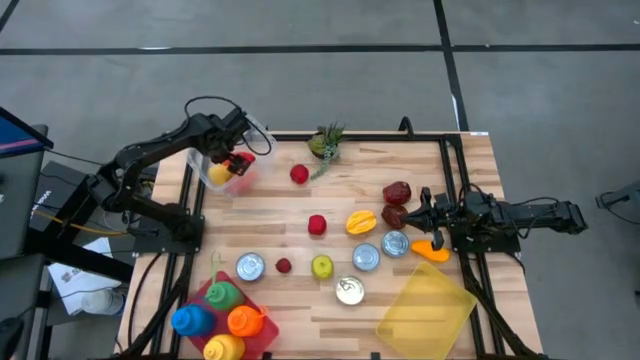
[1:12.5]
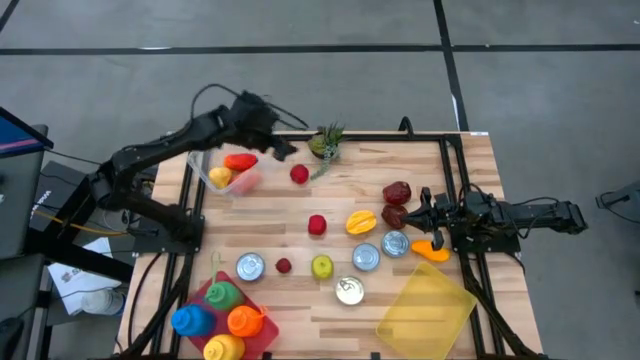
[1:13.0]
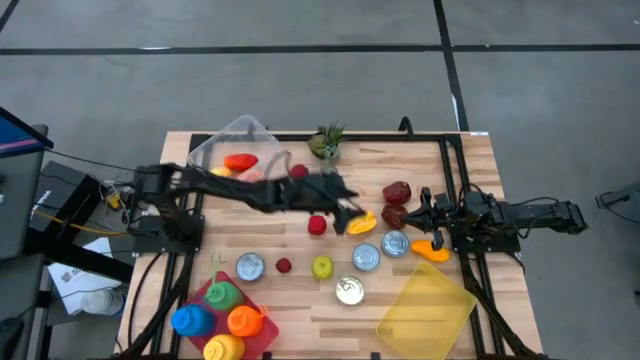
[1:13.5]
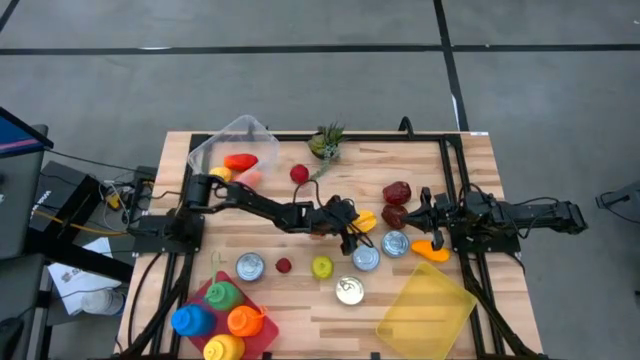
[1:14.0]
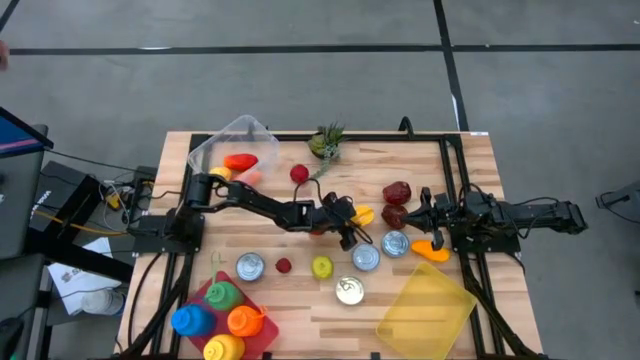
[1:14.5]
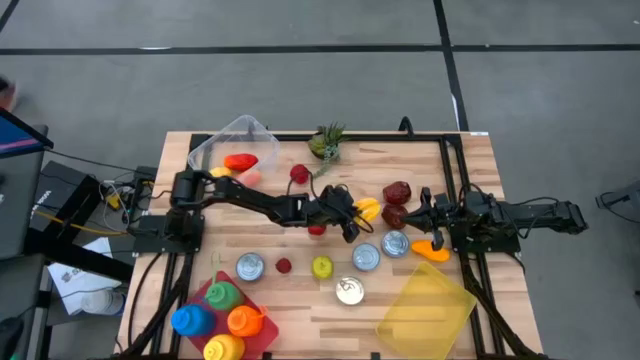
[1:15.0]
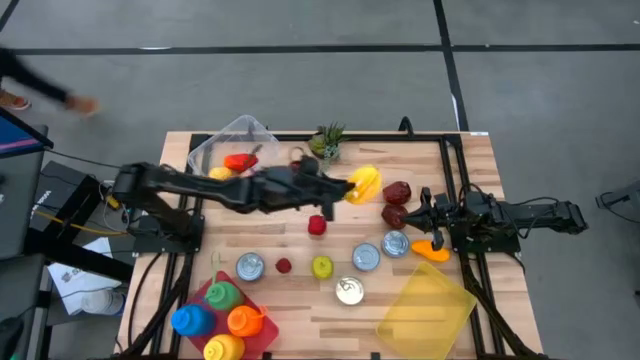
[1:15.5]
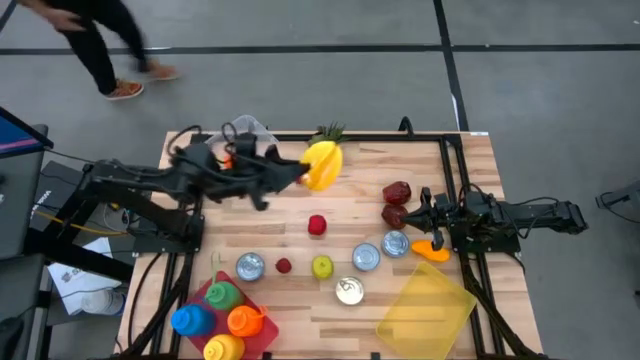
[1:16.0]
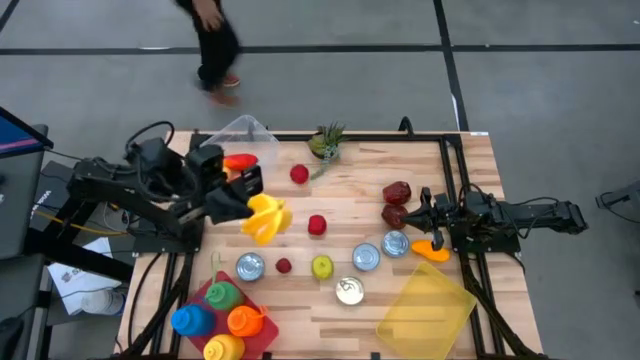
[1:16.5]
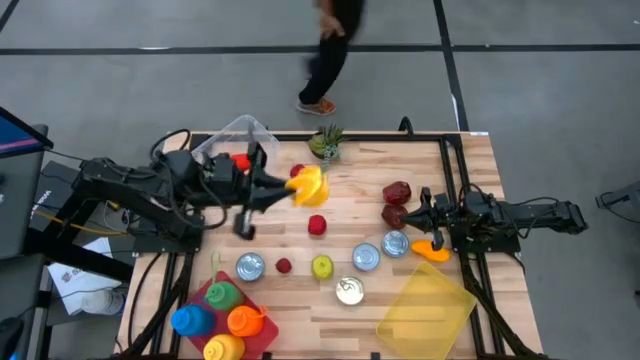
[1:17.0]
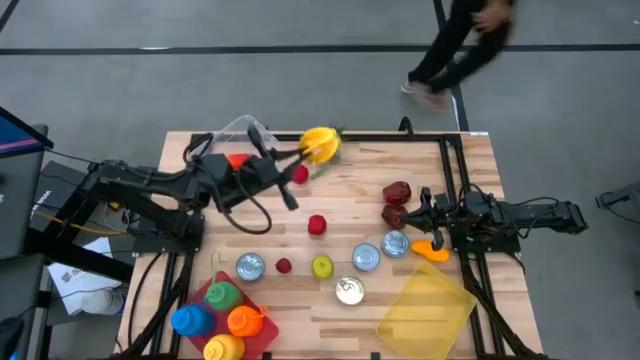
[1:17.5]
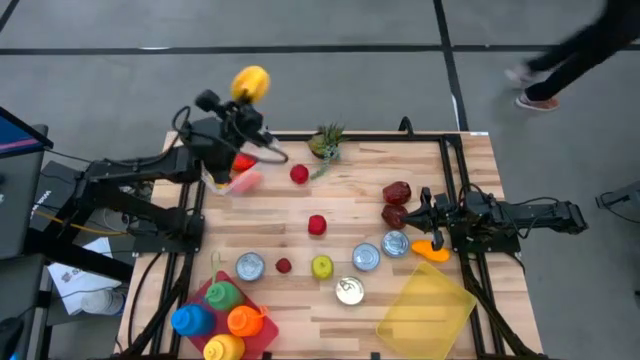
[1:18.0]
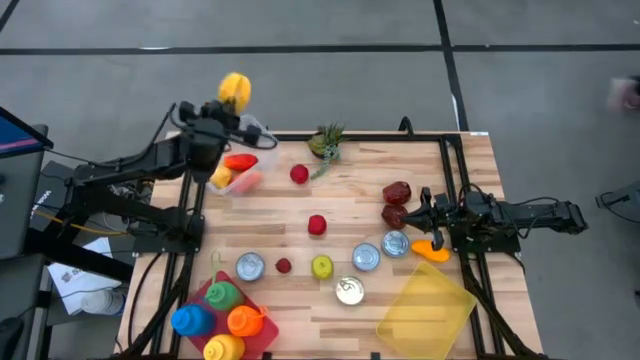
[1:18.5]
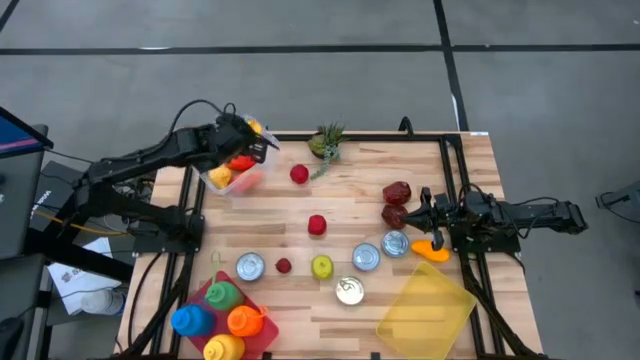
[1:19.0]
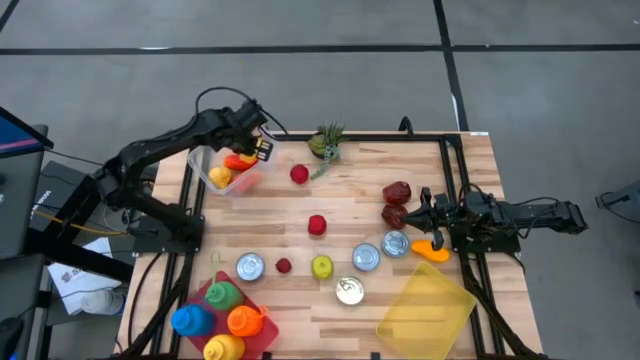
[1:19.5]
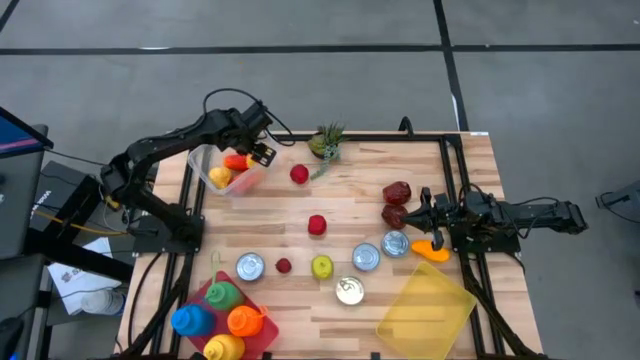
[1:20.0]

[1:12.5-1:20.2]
Task: Pick & Place Food Item
Put the yellow starfruit into the transparent bin

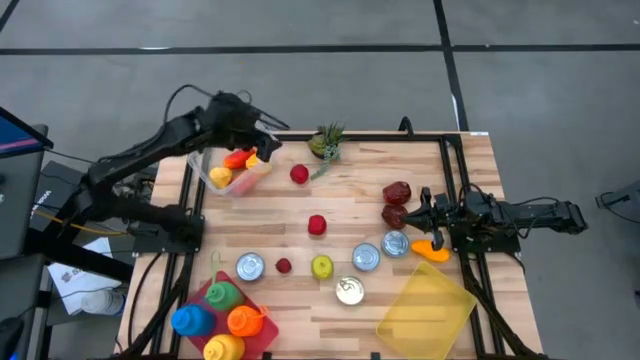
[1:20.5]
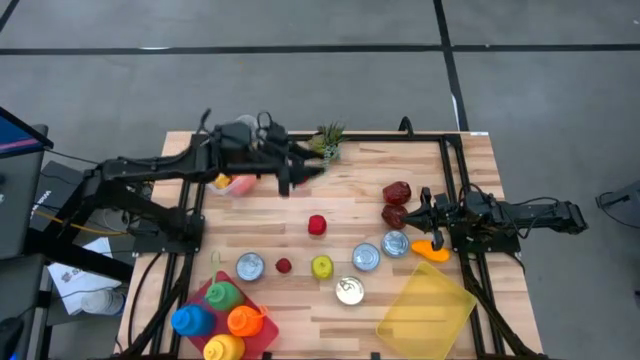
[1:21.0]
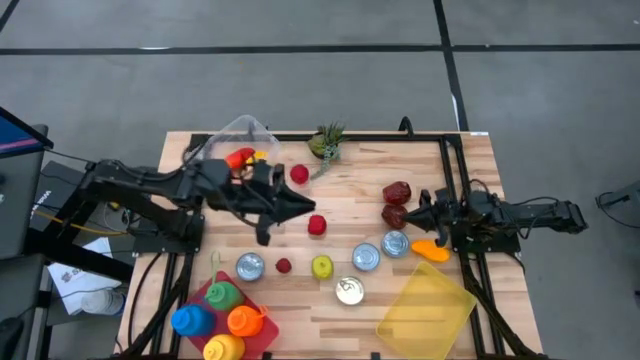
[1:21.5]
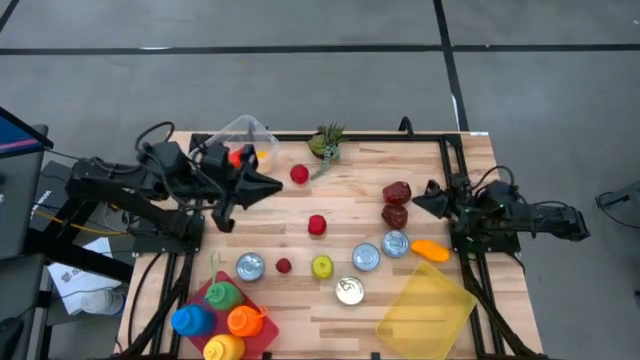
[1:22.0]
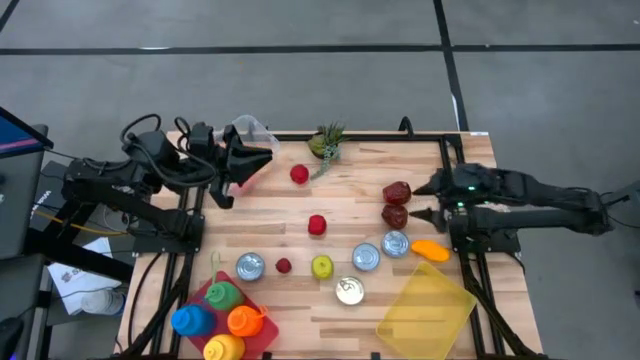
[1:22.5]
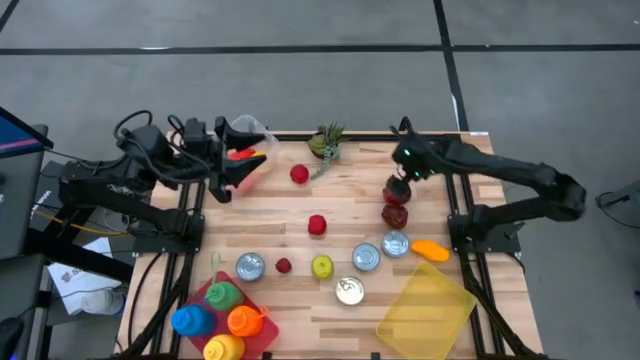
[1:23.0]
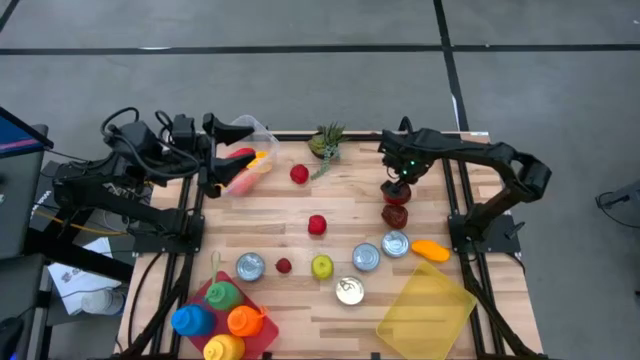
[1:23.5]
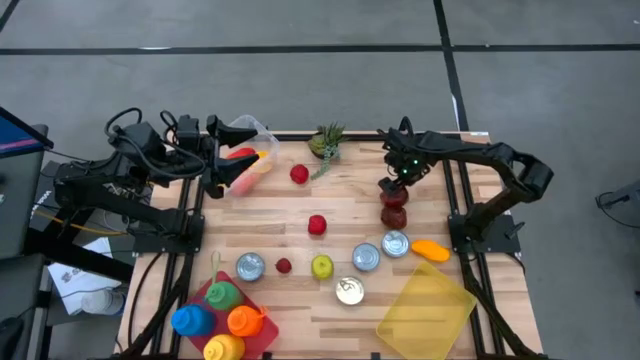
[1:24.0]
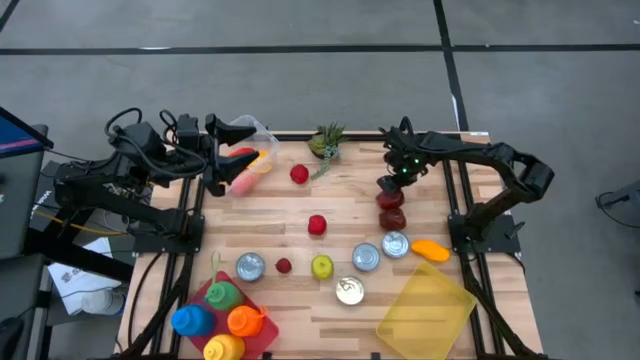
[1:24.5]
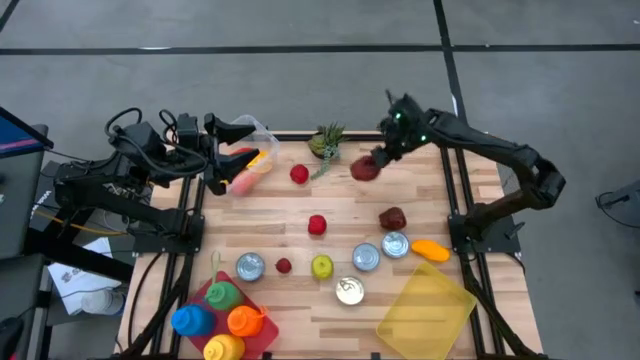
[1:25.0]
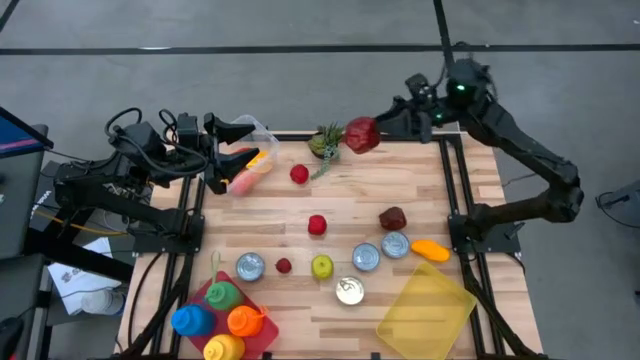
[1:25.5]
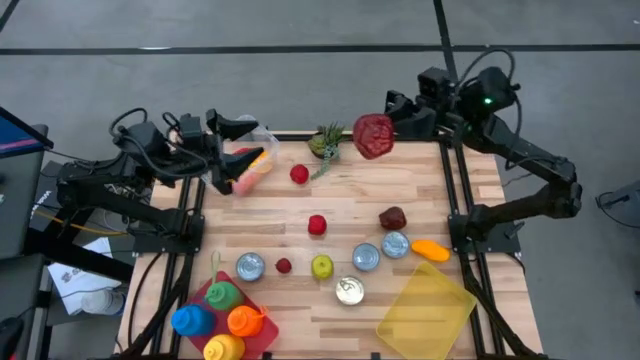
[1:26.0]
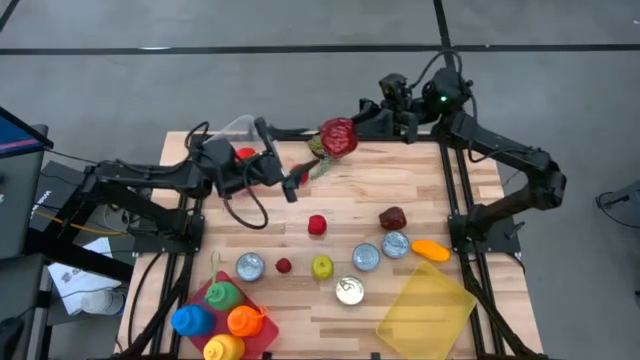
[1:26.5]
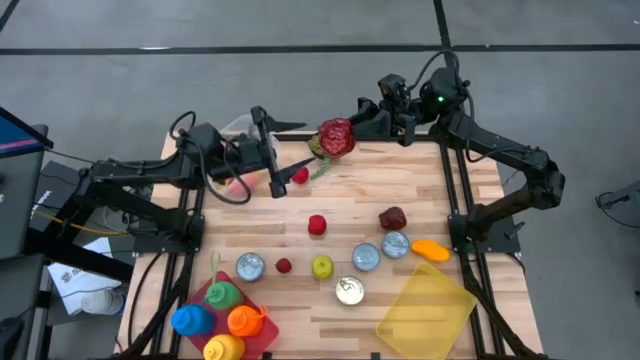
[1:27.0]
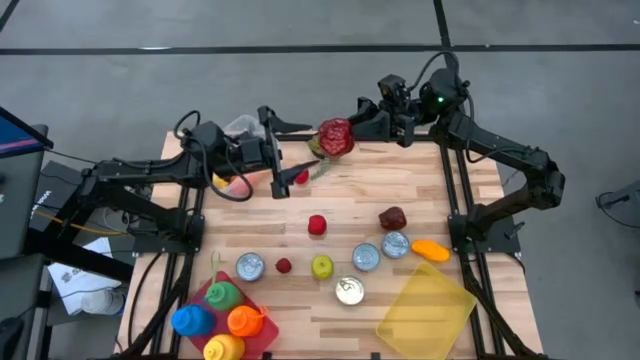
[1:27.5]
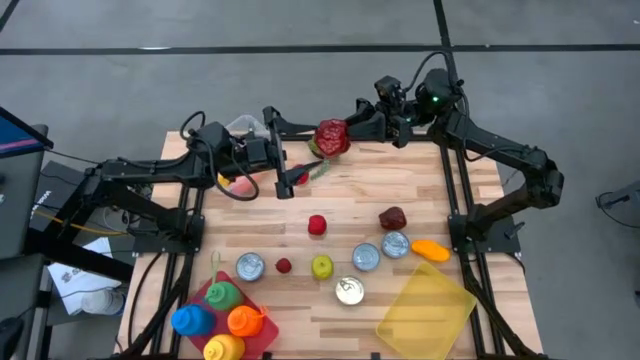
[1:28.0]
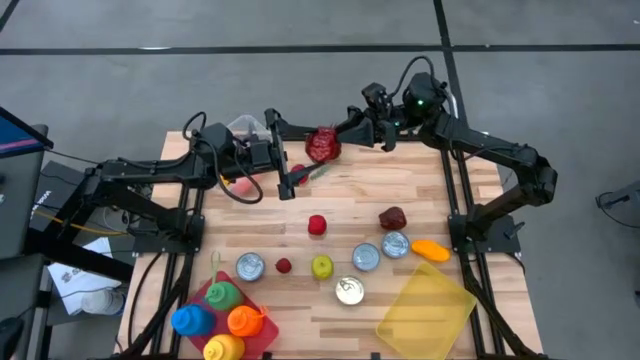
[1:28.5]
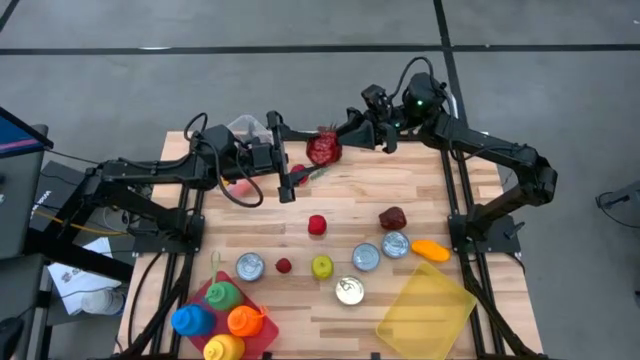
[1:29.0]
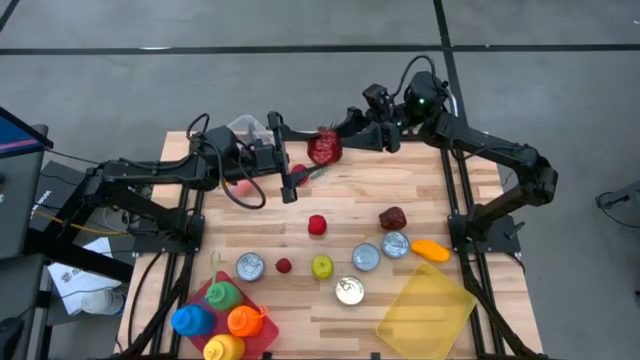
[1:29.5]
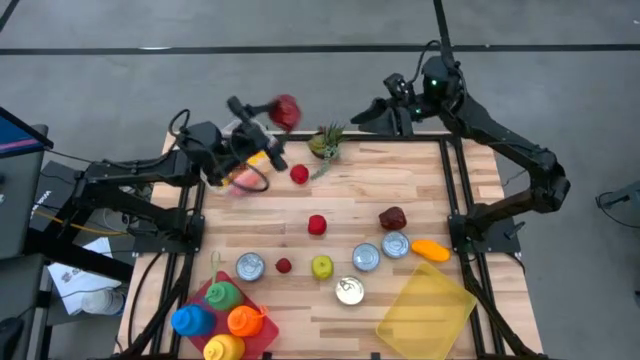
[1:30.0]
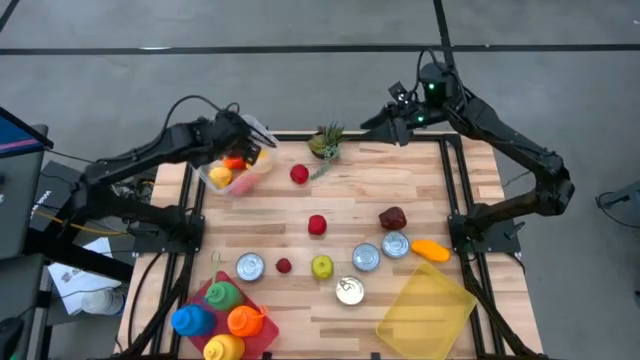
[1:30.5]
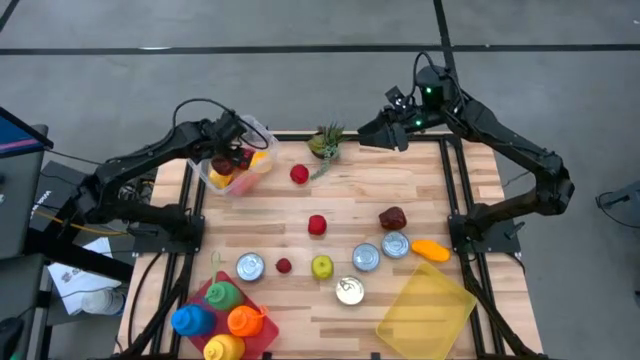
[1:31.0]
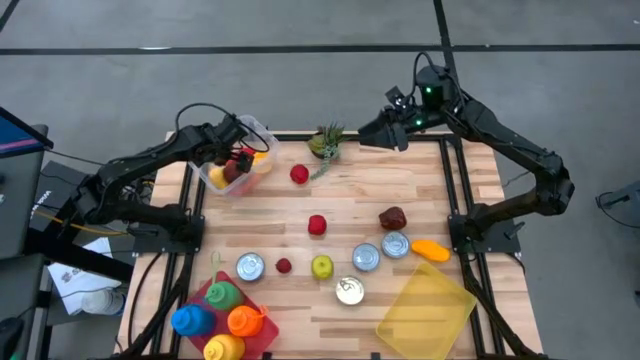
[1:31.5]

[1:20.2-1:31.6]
Put the top red apple into the transparent bin

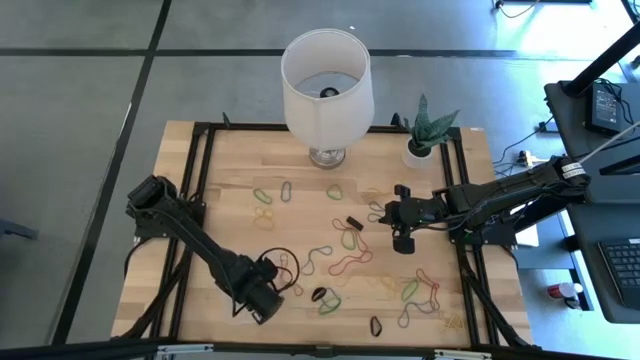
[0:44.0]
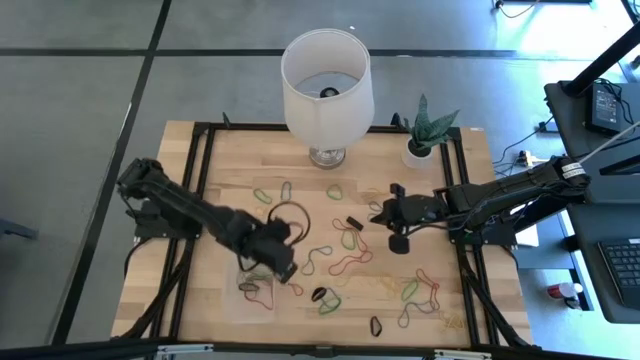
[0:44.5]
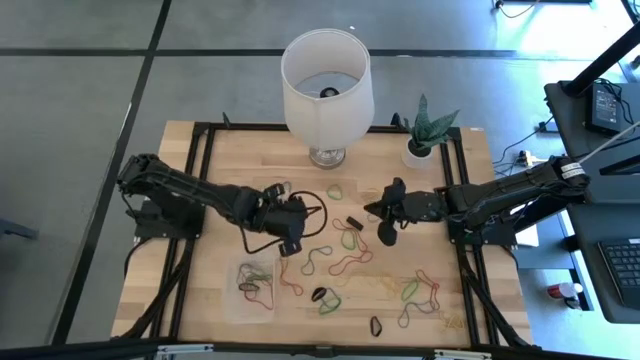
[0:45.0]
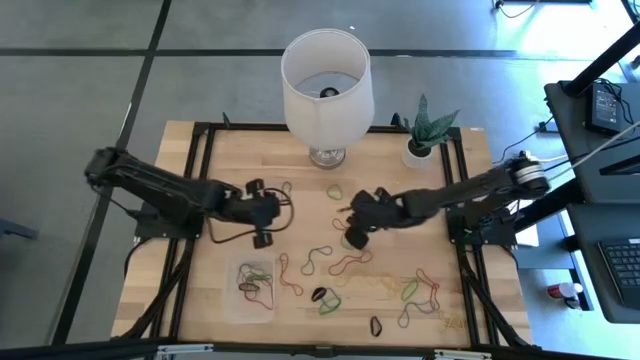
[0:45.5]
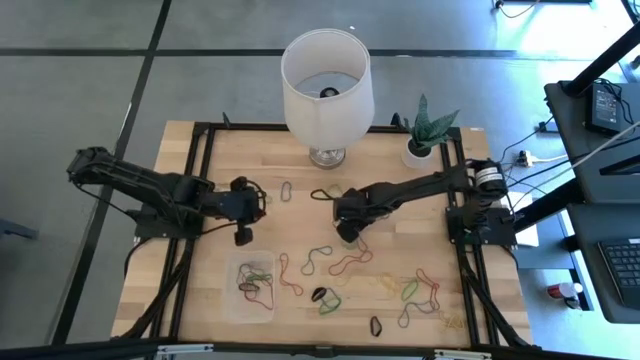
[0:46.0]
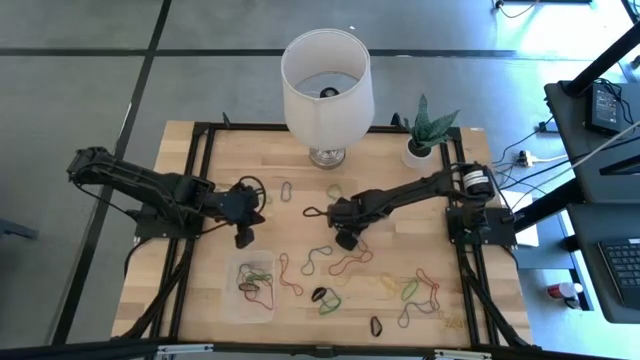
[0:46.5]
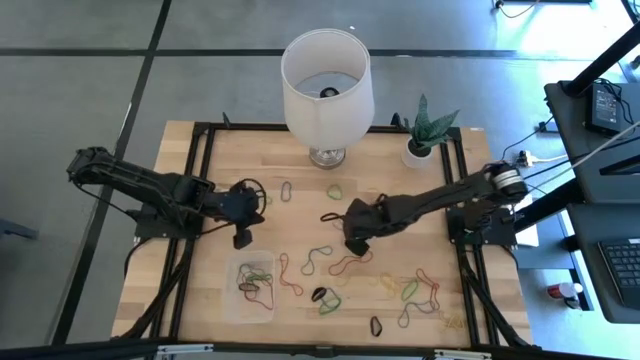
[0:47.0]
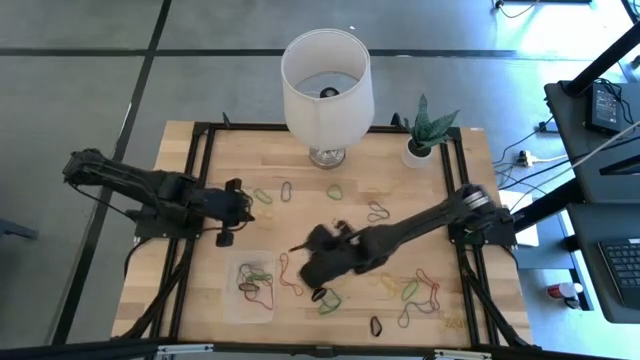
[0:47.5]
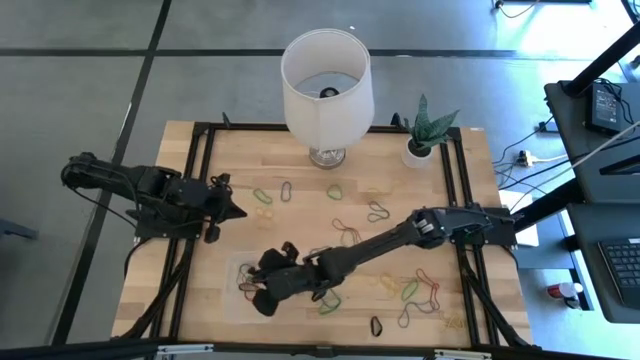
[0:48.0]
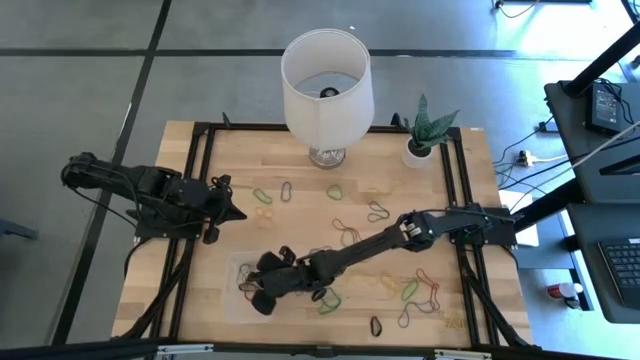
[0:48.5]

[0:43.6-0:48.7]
Task: Pick and place rubber bands into bin
Put the black rubber band into the transparent bin
